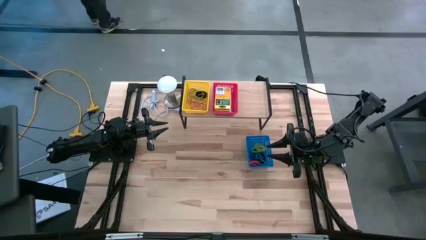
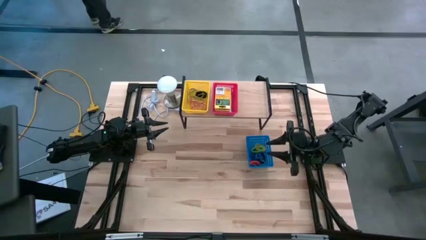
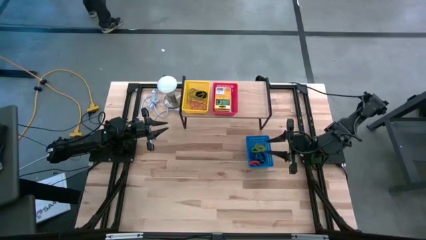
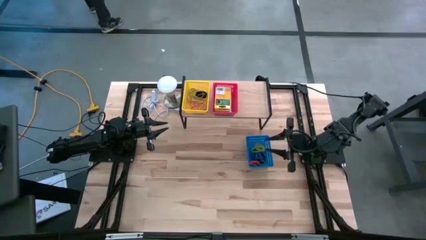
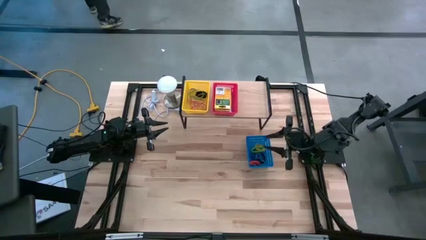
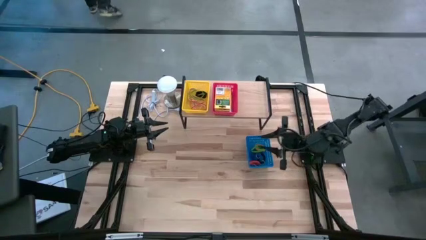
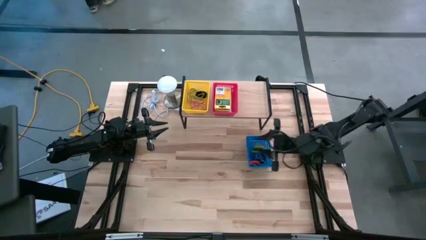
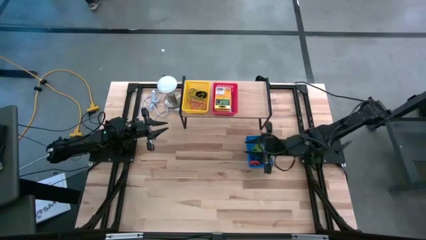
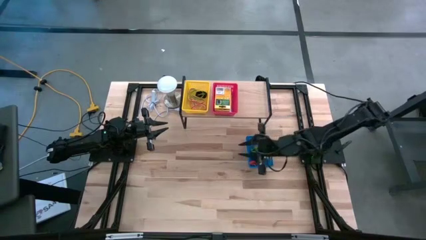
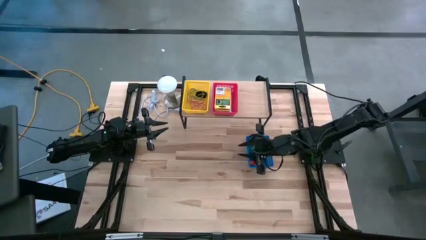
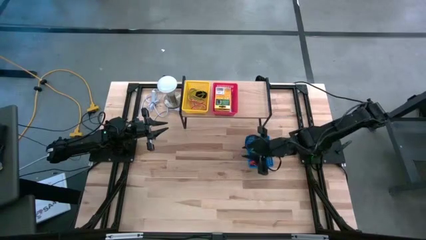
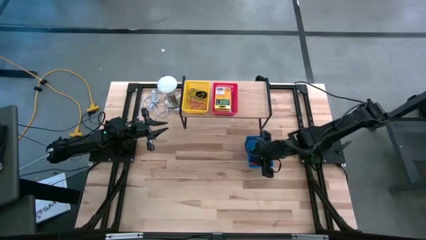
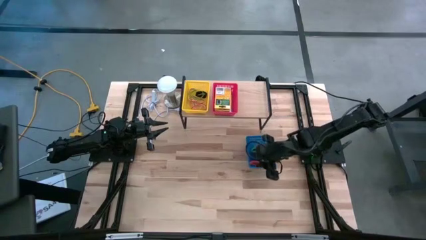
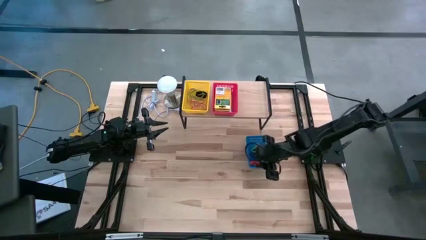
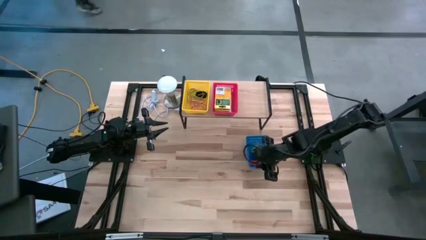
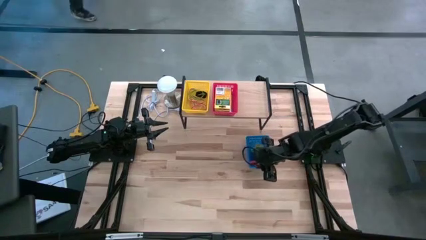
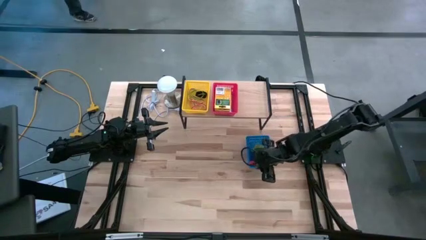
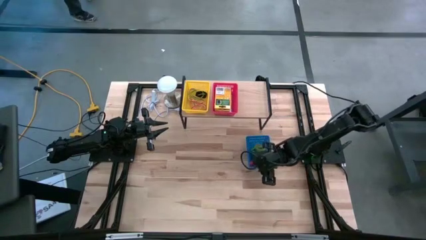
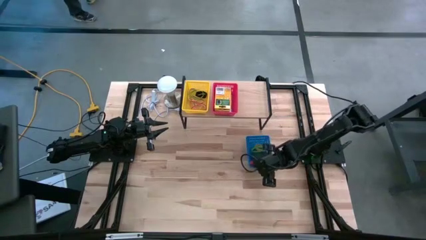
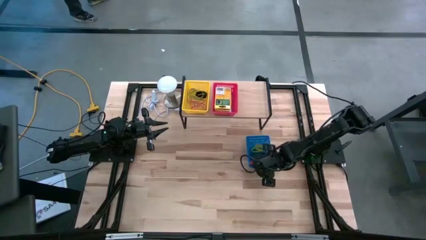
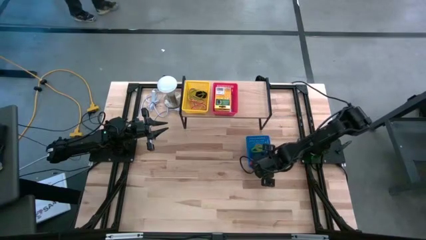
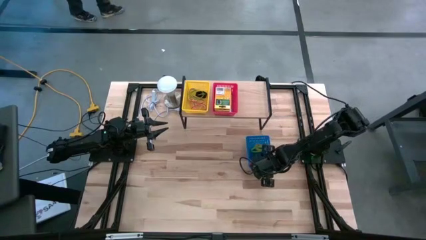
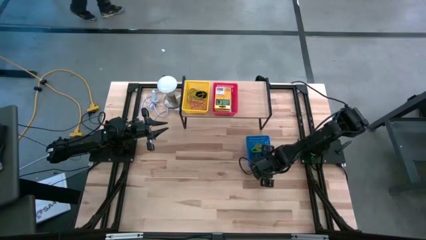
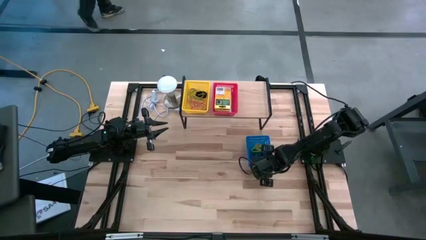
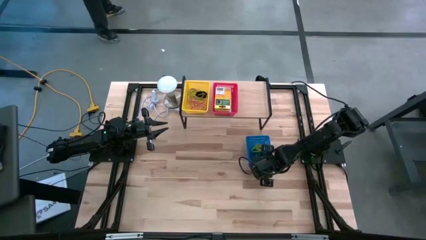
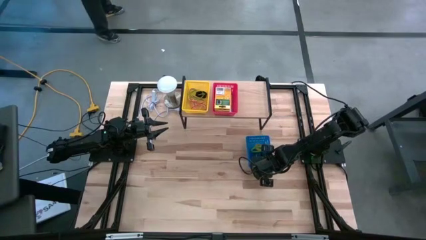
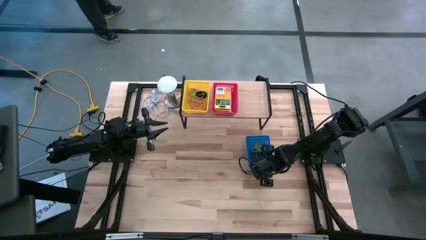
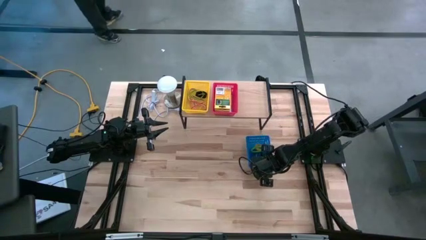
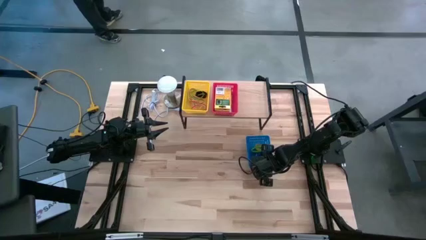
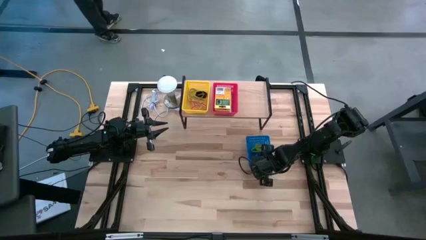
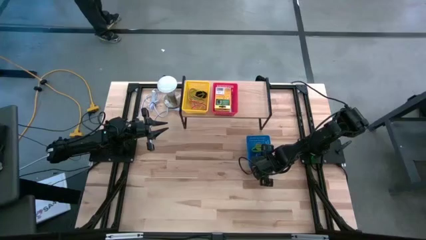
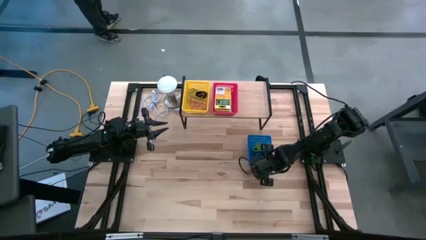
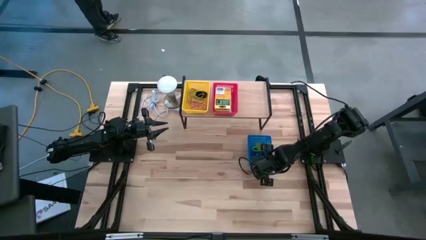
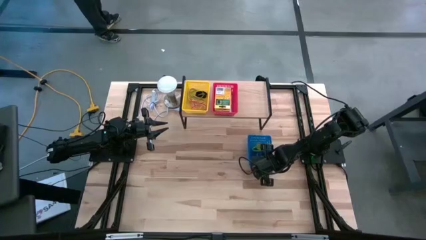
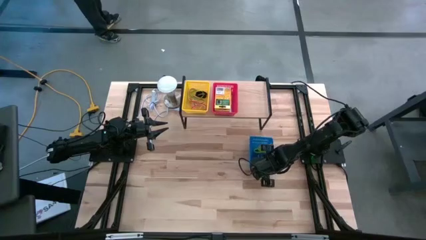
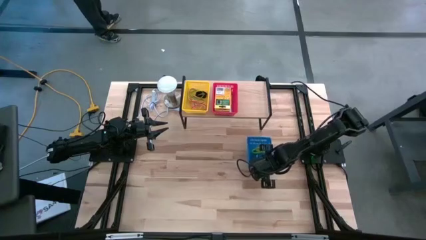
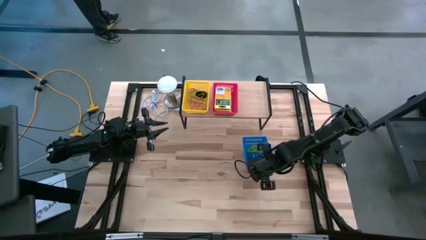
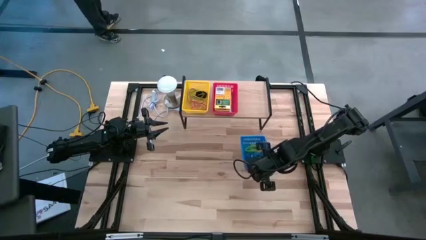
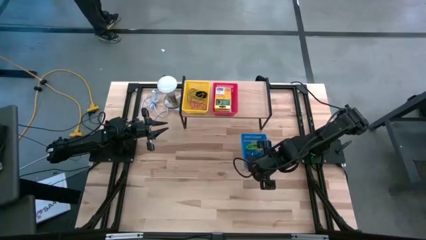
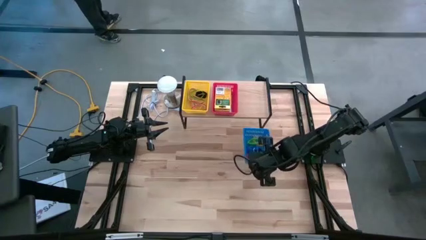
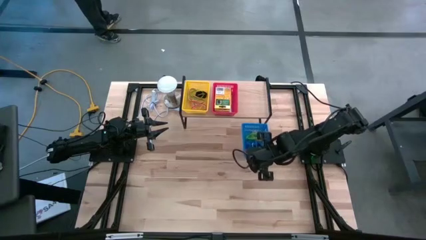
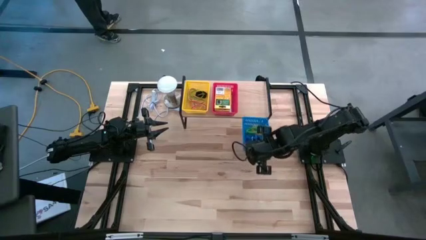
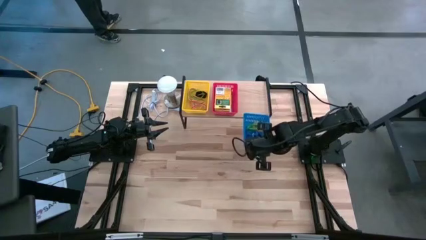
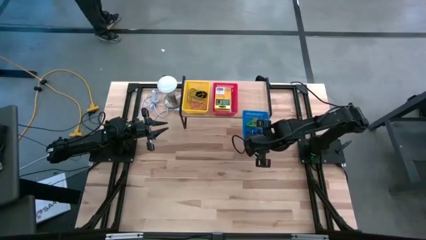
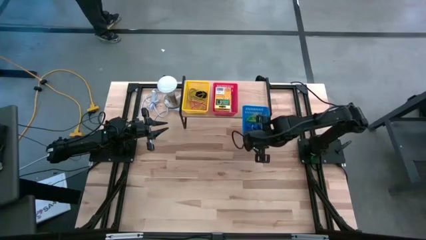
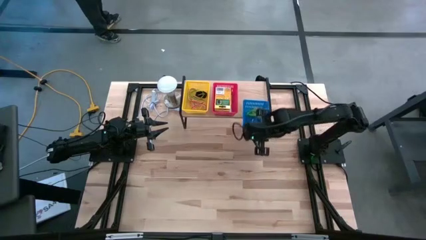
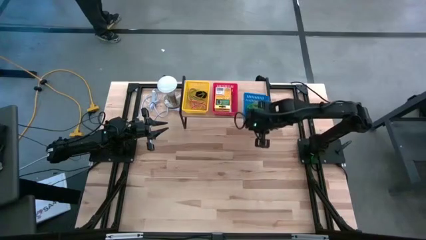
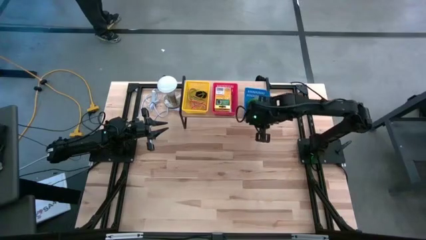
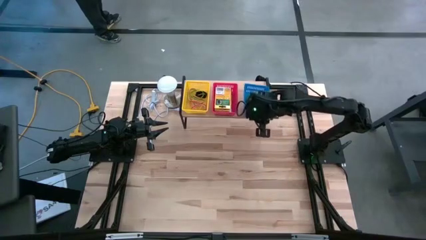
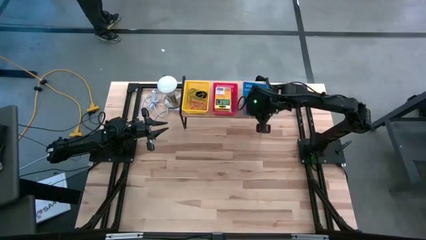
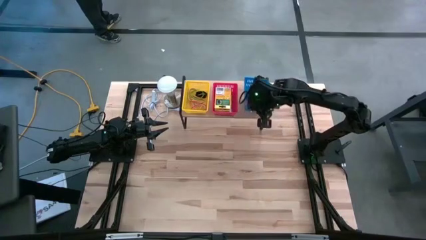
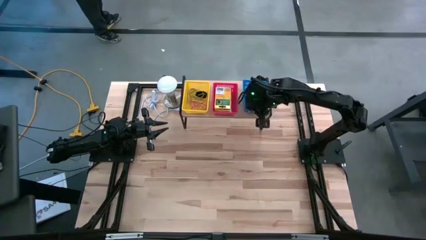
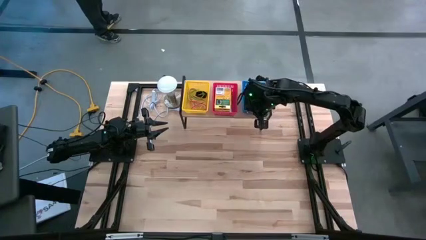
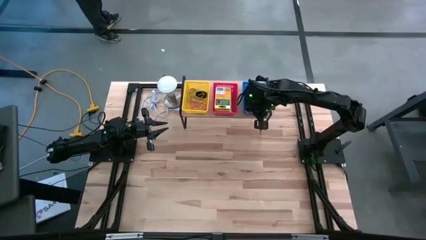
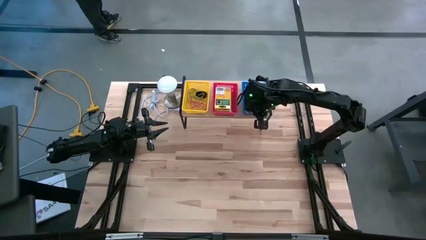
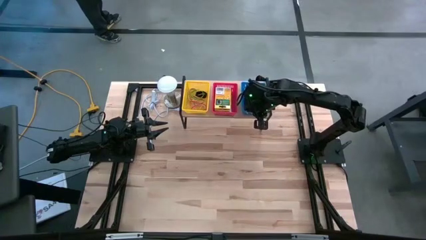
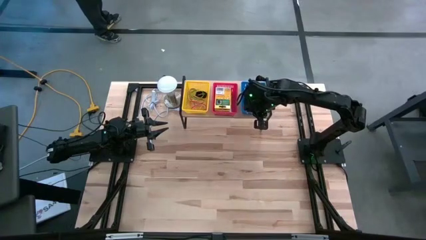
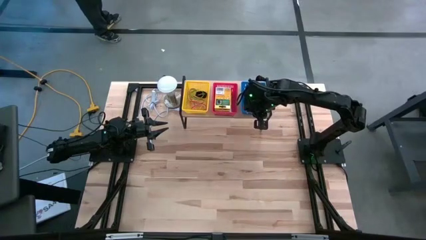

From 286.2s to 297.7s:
Task: Pick & Place Office Desk Supplies
Put the blue bin with the spiral keychains on the shelf
